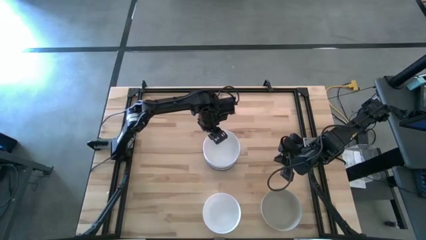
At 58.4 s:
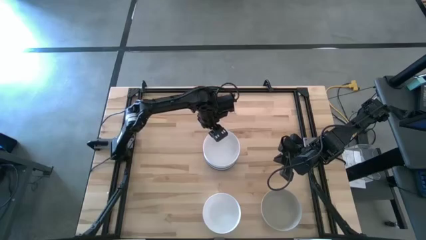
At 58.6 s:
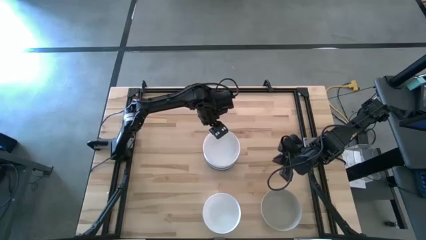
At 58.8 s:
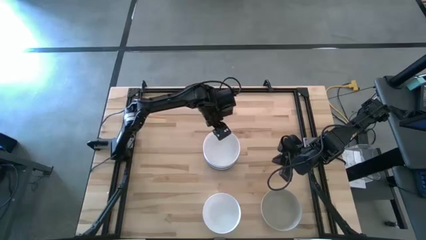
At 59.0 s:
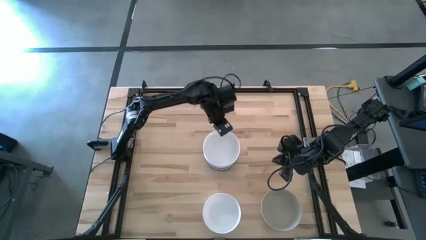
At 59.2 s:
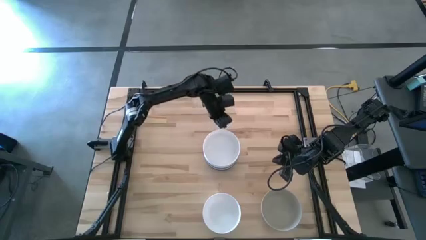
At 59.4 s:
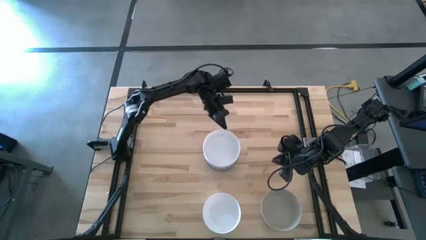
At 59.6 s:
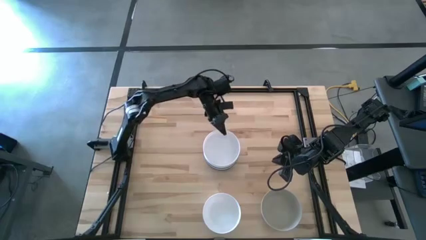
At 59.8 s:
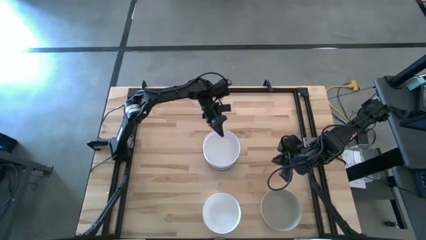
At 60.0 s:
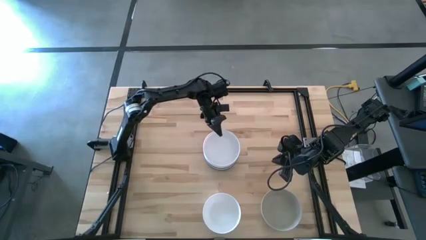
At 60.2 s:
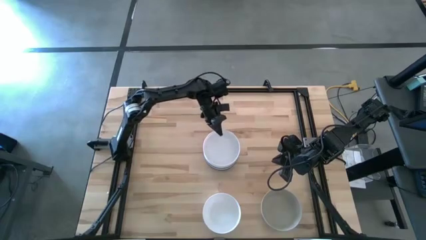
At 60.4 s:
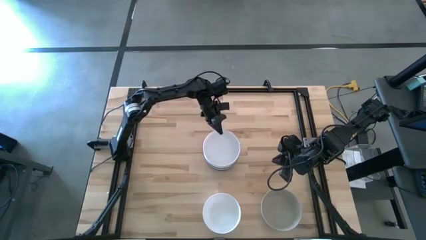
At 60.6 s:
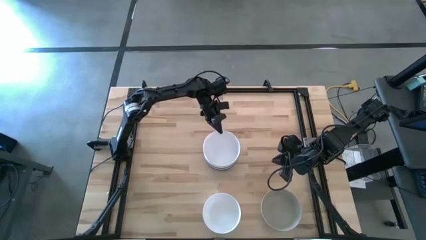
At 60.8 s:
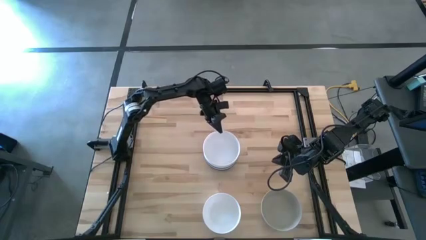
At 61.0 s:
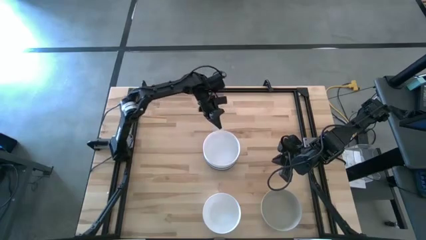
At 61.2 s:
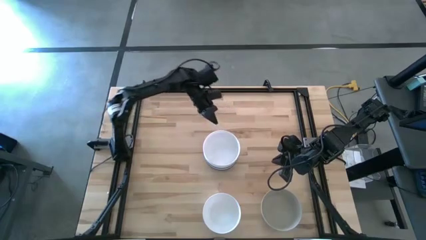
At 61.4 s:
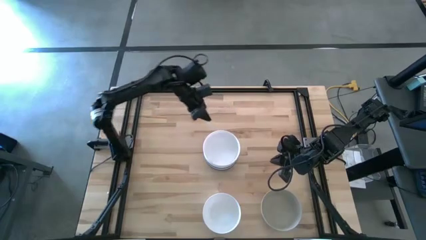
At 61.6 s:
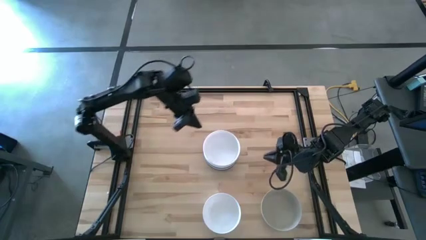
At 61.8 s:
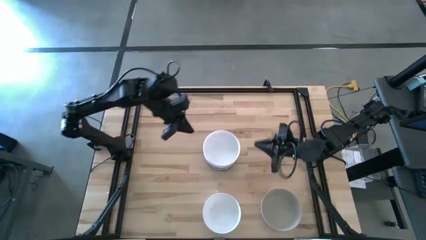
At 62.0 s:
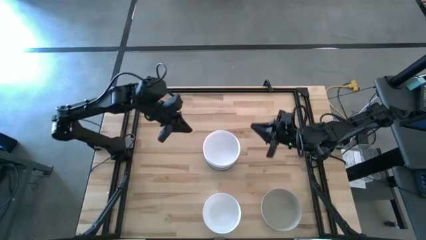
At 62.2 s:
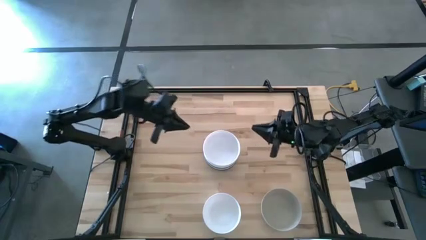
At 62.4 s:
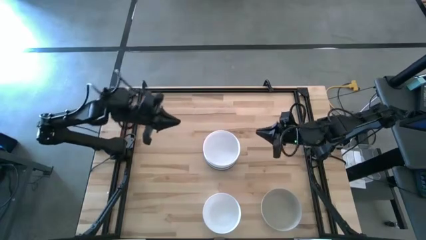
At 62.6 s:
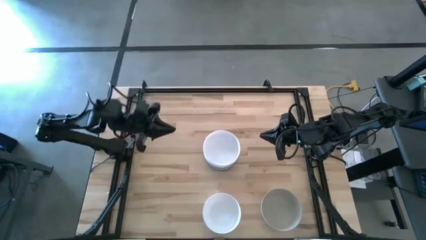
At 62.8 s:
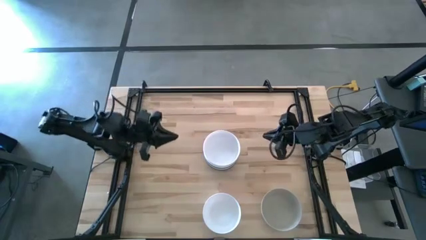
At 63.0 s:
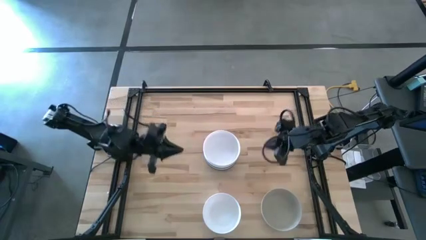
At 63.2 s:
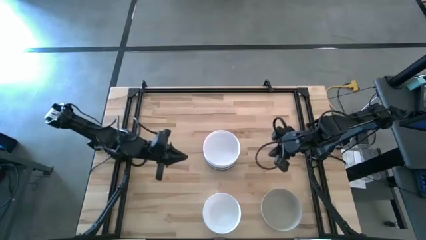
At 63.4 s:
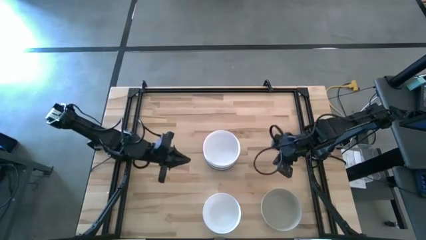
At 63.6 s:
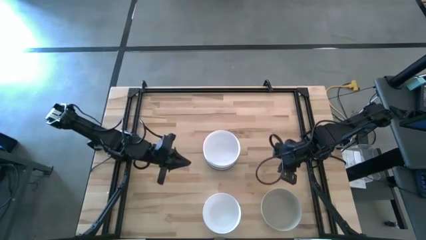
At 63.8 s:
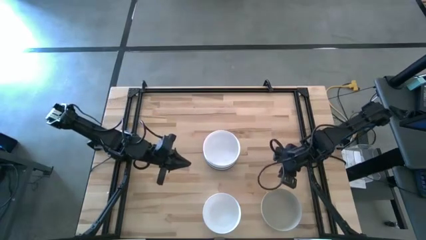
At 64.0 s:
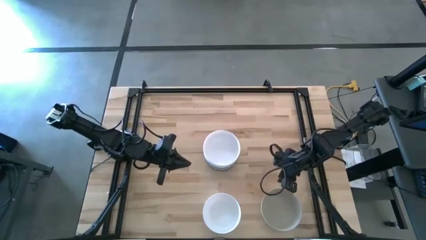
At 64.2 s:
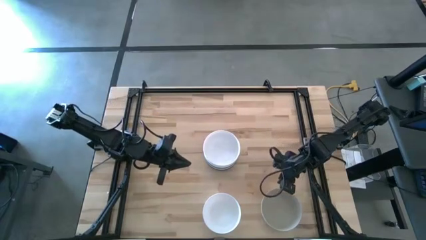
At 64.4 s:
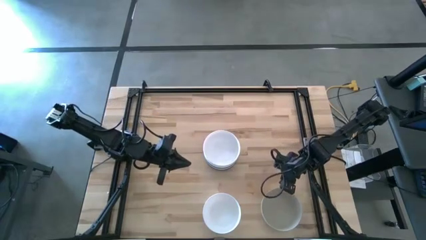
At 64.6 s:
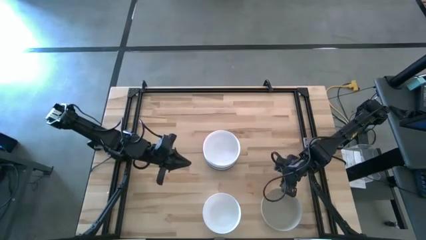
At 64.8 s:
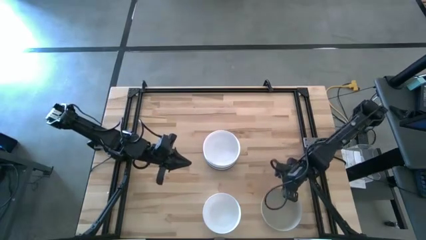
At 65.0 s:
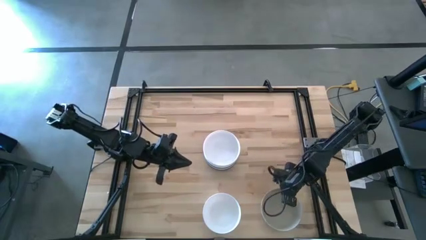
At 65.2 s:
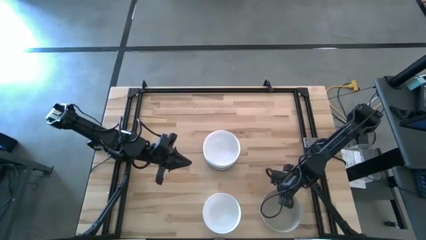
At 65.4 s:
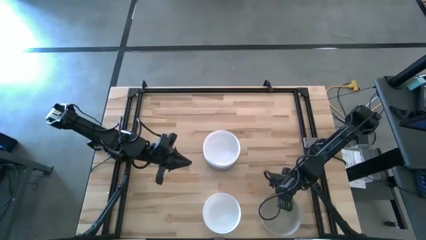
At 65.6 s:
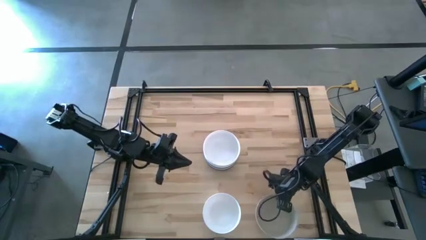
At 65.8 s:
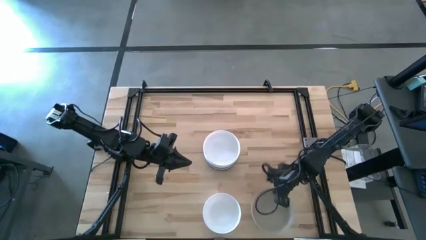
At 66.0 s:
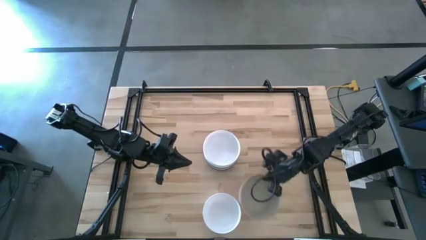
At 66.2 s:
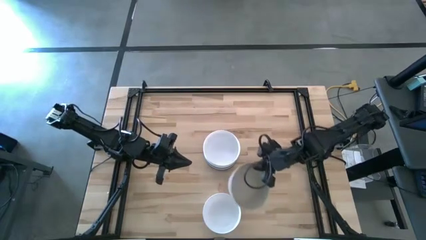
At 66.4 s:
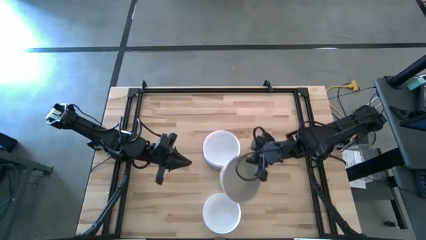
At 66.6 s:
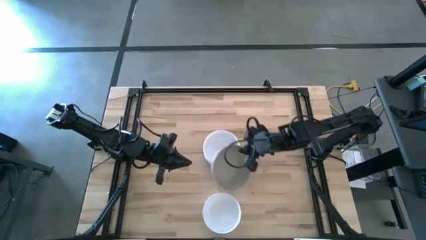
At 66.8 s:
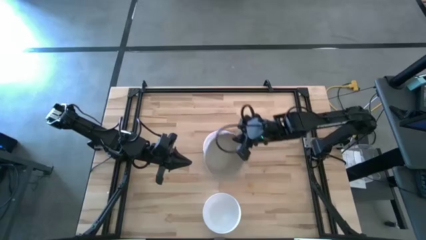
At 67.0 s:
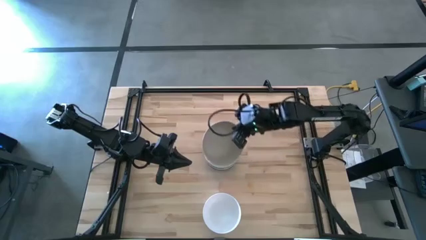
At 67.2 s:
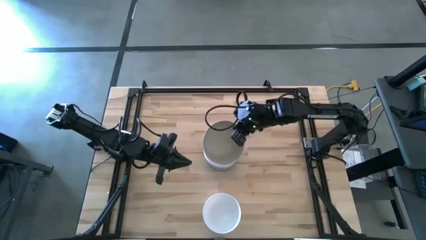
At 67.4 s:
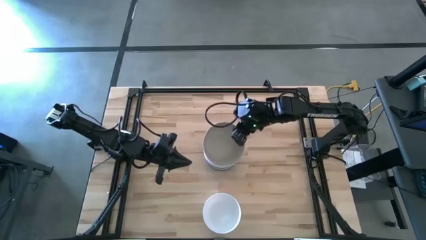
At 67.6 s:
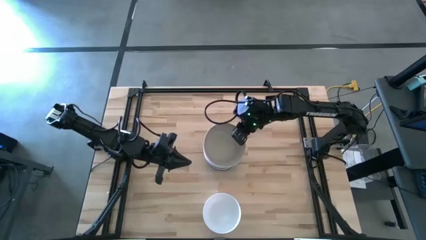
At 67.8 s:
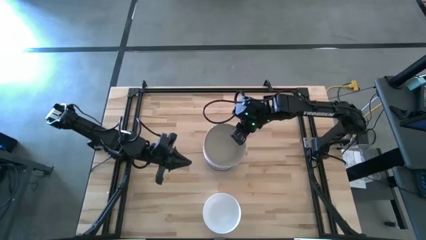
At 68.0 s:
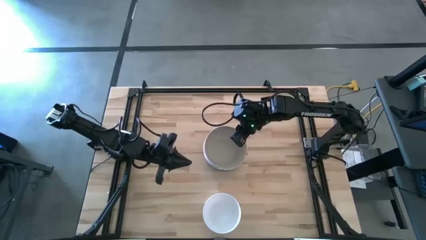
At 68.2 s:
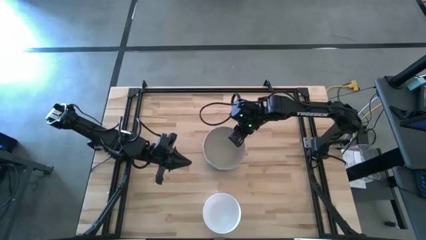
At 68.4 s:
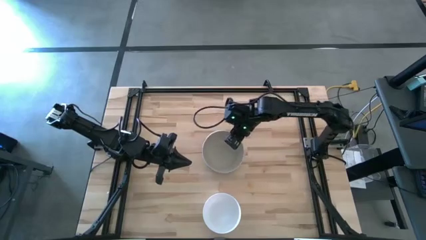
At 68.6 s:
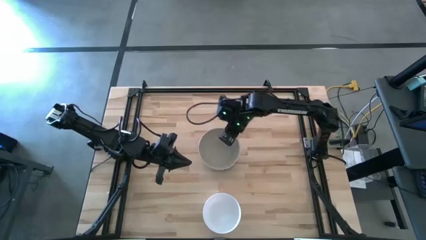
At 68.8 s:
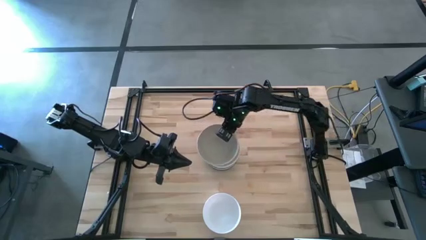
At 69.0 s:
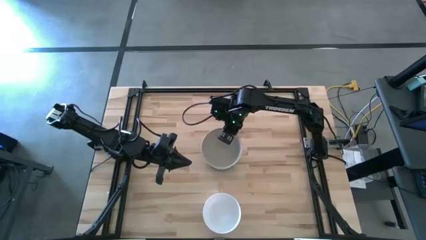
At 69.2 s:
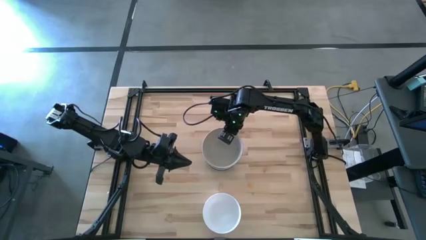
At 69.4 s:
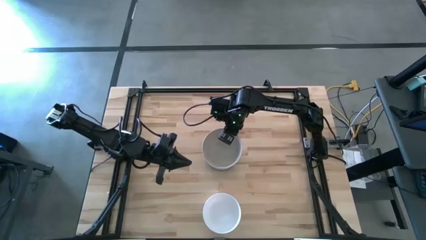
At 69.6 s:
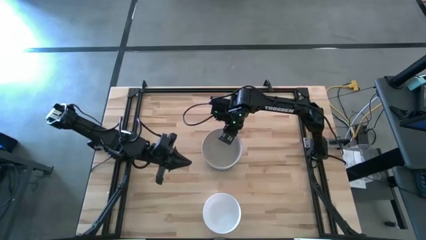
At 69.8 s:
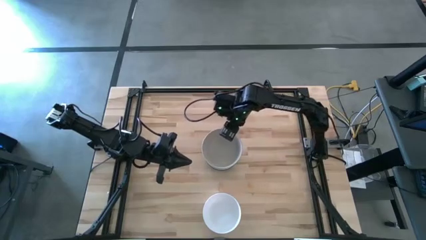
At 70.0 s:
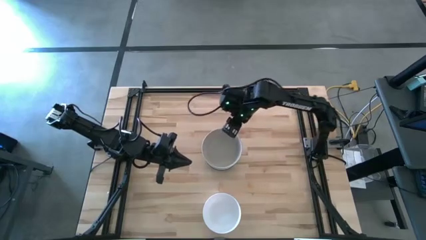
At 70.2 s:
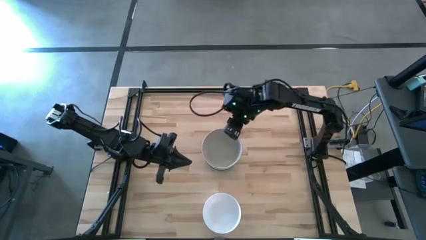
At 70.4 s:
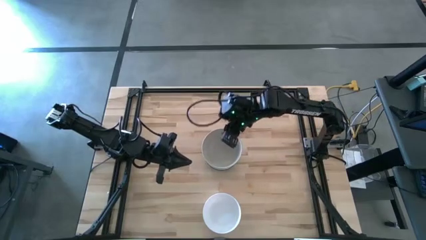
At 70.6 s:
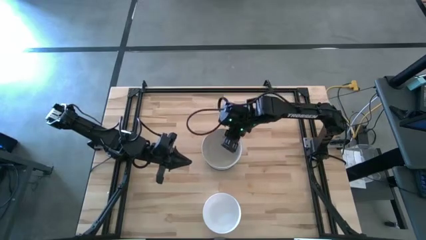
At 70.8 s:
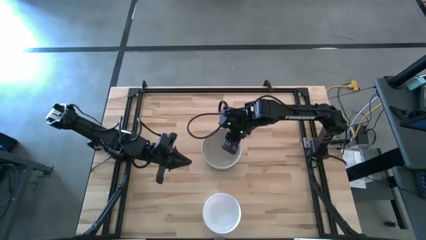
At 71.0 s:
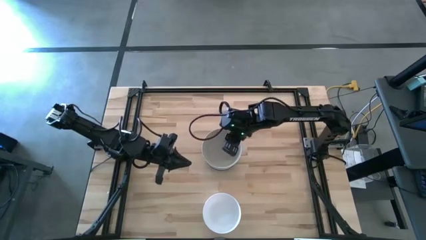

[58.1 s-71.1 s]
Task: Nest bowls inside each other
Stack the light brown bowl on top of the white bowl
